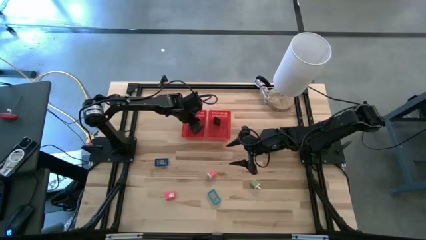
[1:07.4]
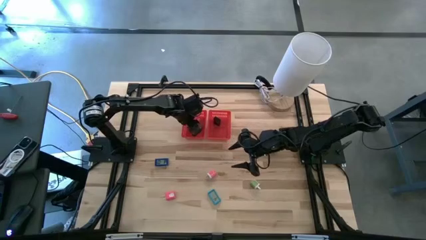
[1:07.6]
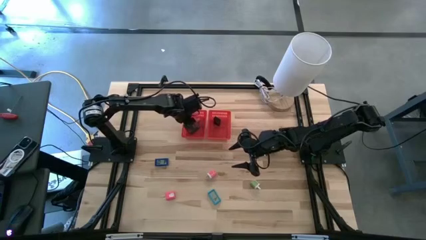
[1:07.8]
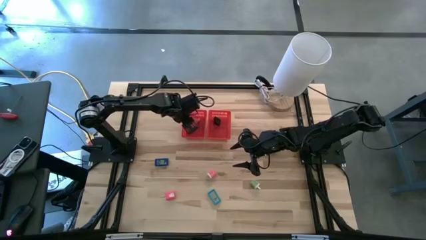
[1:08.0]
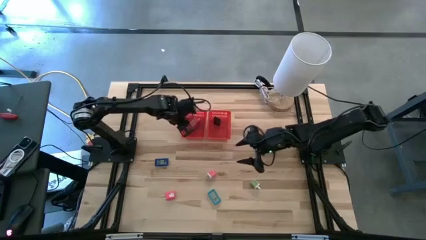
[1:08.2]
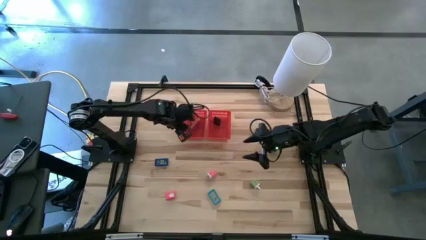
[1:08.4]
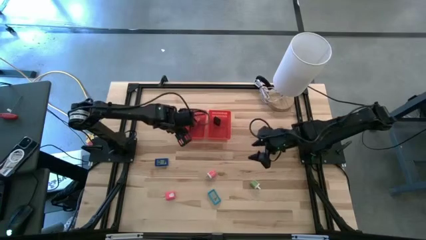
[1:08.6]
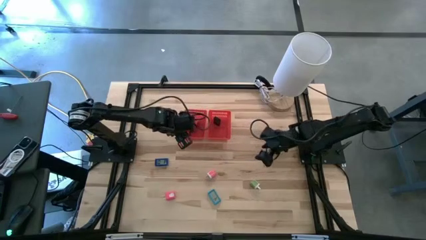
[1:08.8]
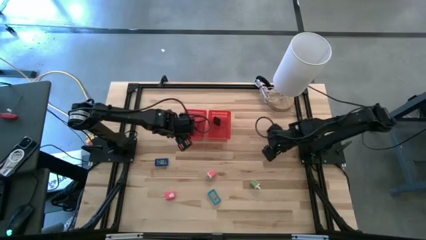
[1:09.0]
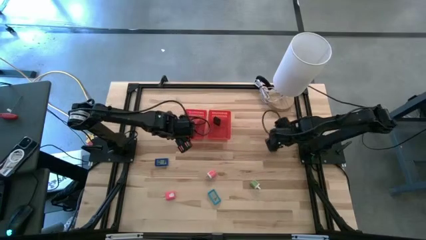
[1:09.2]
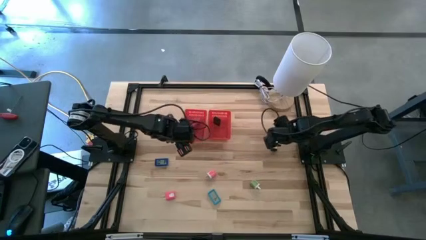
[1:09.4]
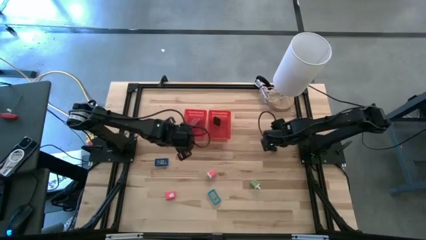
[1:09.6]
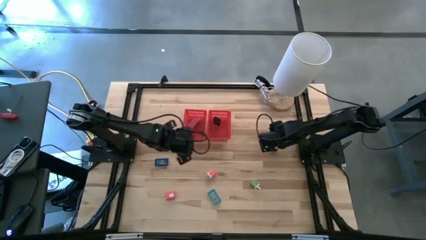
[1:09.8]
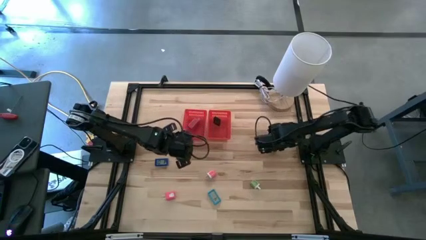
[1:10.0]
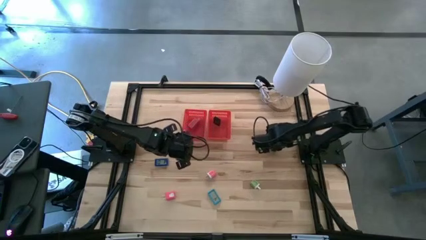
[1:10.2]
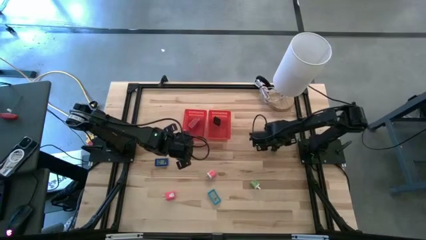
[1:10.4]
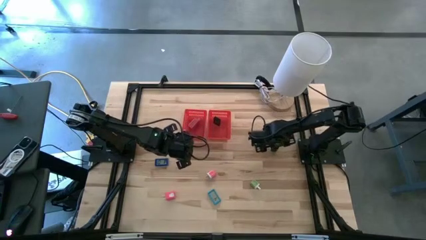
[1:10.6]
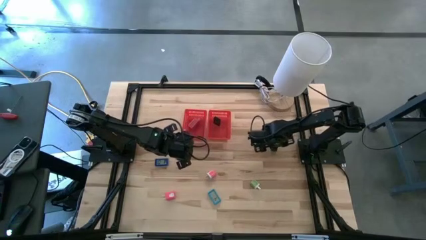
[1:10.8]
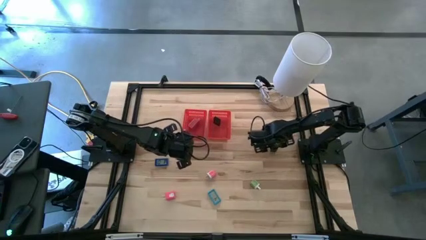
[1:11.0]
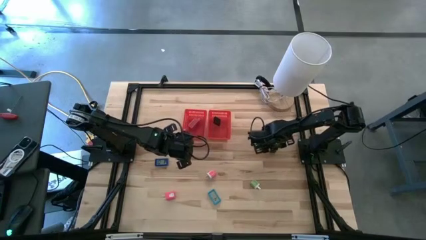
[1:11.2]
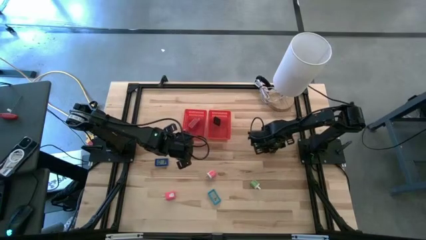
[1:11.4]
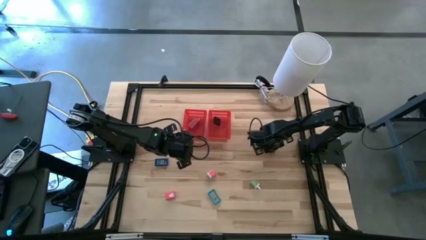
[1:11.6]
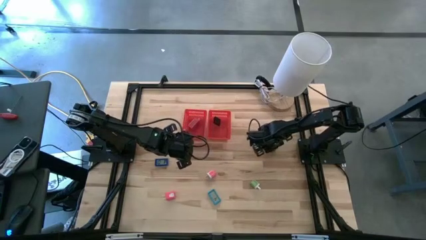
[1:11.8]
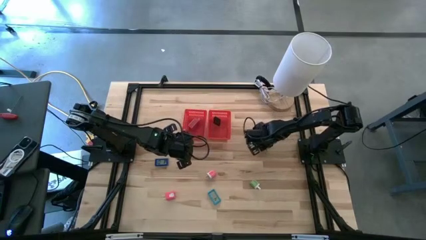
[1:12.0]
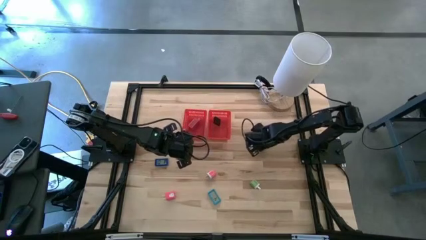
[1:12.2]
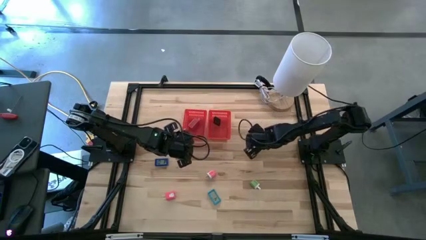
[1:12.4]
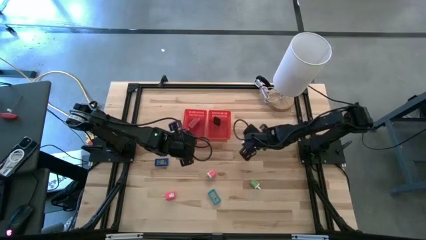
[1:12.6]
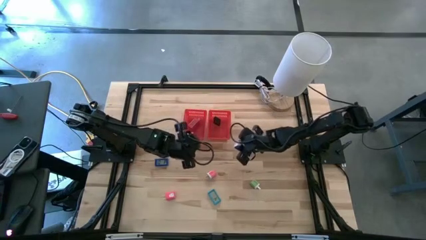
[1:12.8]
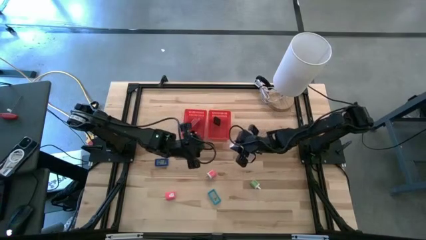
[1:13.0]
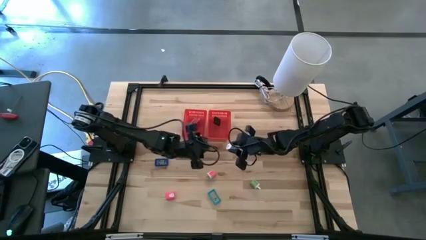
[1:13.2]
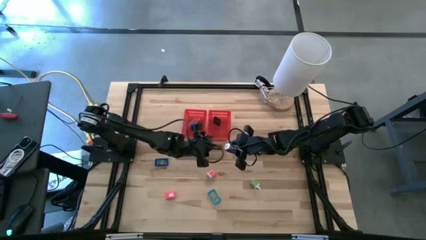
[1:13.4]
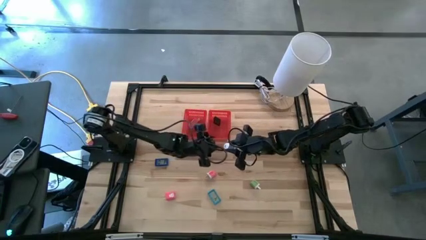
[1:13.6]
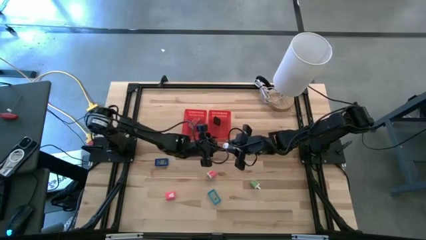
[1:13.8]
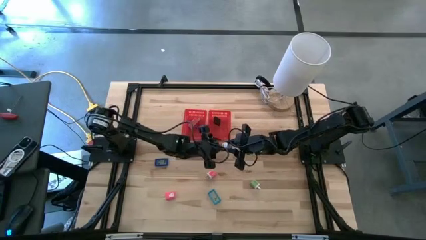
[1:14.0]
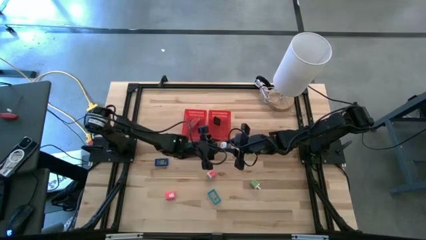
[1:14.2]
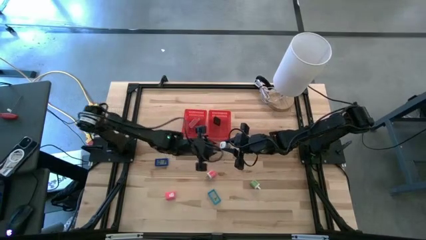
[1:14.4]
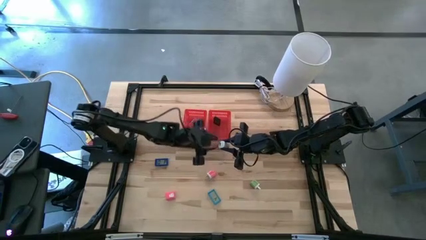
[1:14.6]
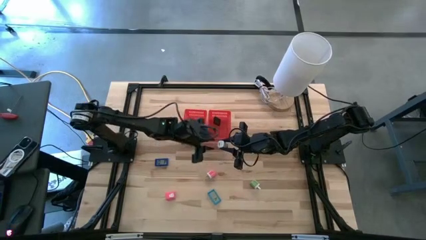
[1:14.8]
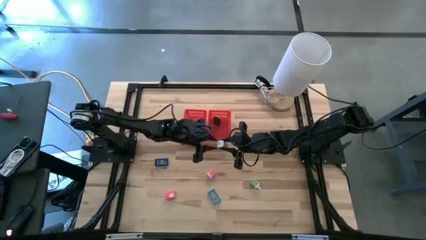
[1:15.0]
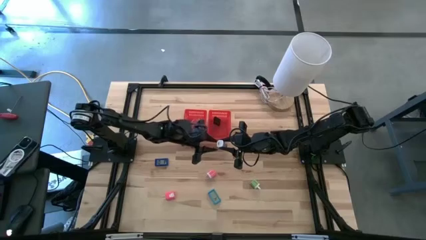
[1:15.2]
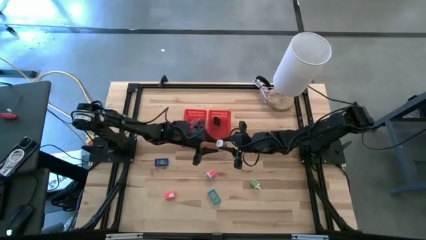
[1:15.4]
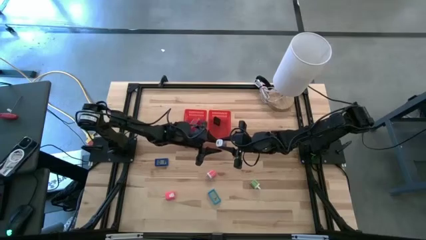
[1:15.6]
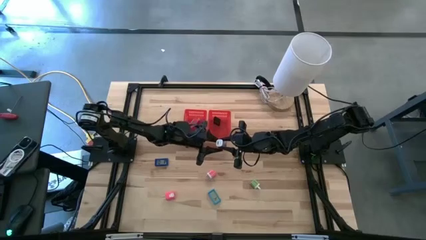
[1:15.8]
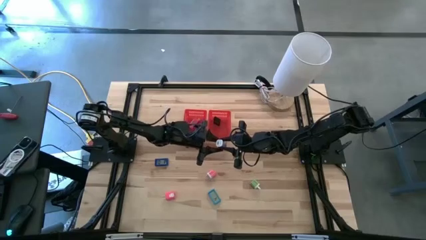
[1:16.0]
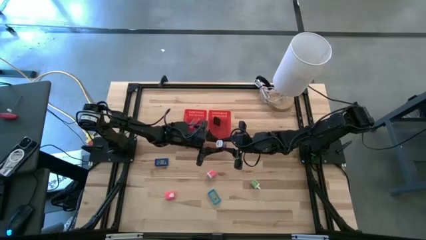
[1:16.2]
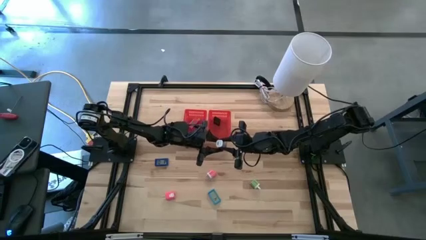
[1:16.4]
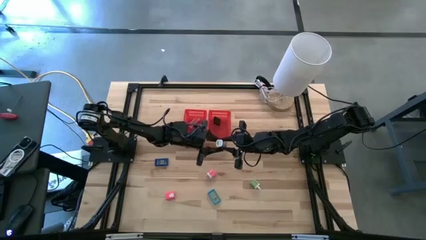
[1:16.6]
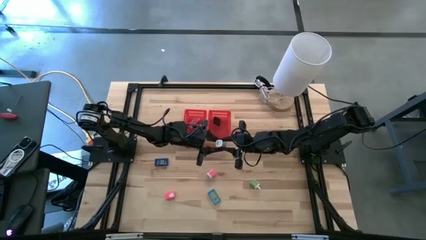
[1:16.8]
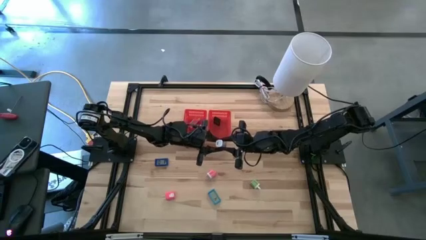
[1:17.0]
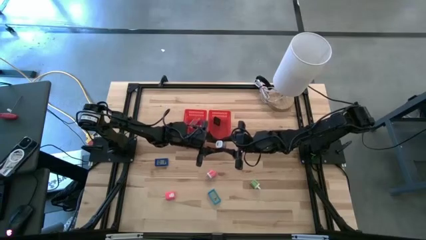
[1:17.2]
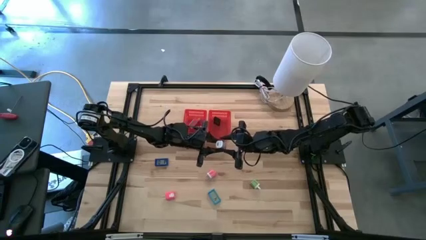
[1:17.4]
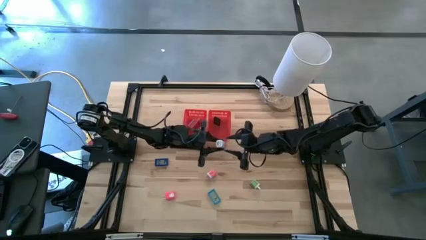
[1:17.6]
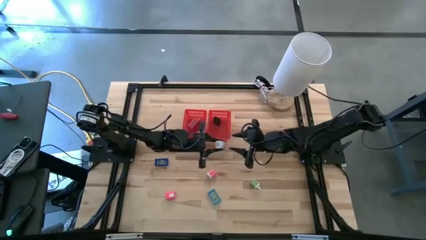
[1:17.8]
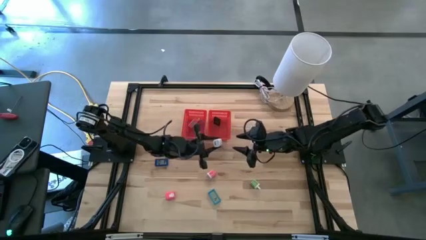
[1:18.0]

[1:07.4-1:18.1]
Task: Pick & Place Office items
Put the white charger adapter into the left red bin

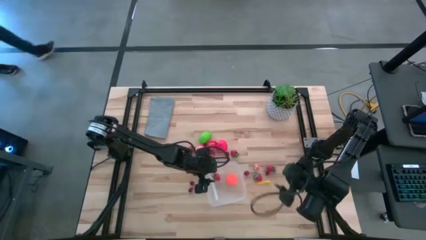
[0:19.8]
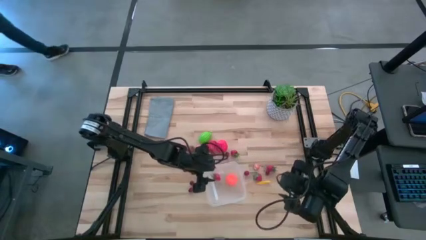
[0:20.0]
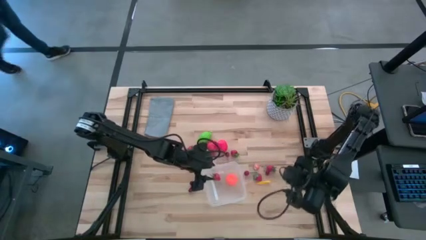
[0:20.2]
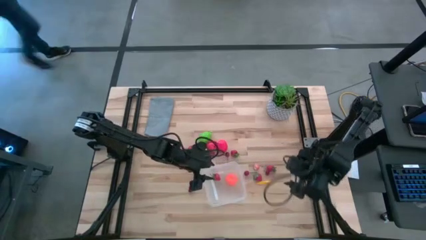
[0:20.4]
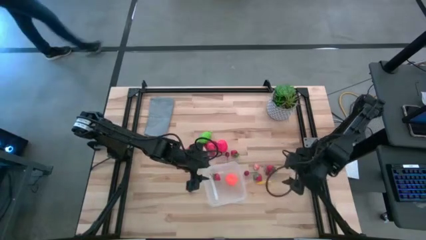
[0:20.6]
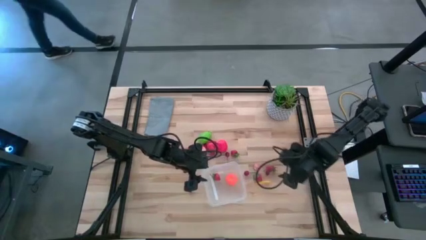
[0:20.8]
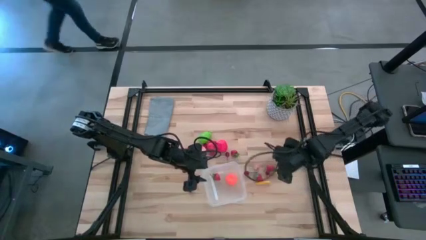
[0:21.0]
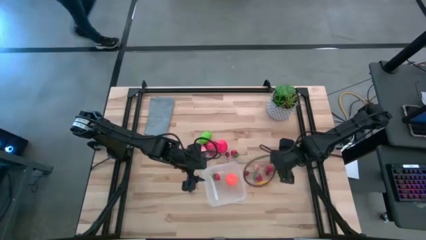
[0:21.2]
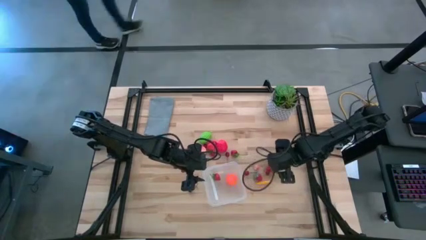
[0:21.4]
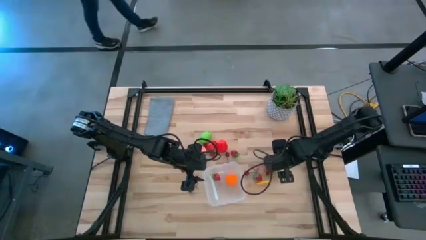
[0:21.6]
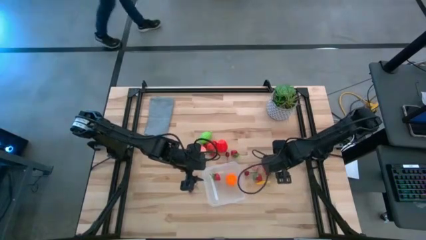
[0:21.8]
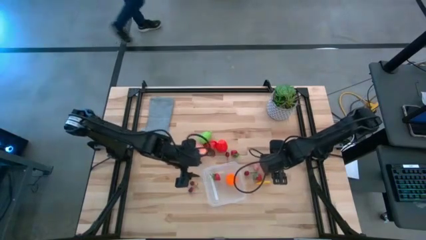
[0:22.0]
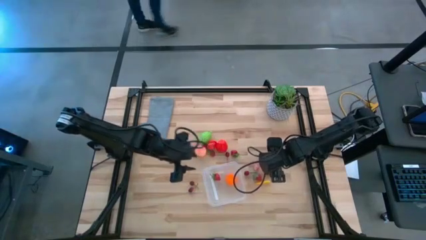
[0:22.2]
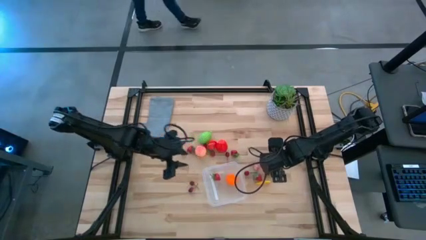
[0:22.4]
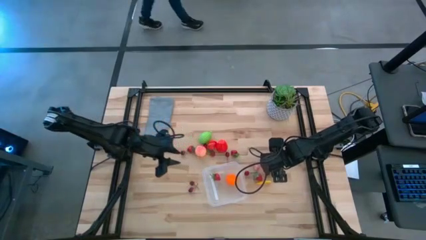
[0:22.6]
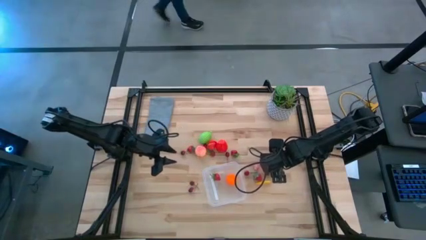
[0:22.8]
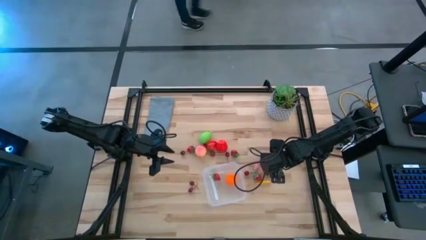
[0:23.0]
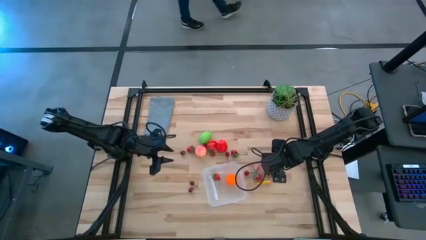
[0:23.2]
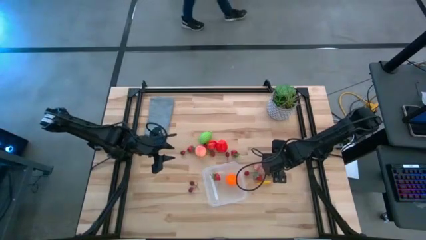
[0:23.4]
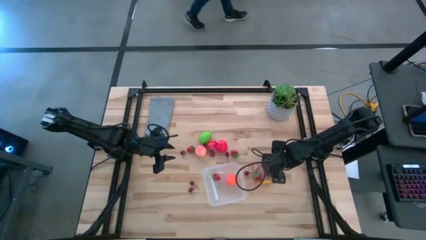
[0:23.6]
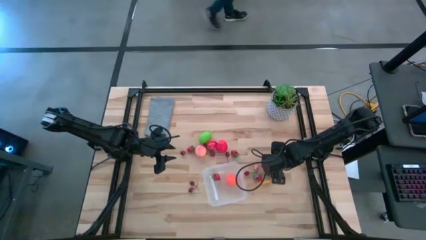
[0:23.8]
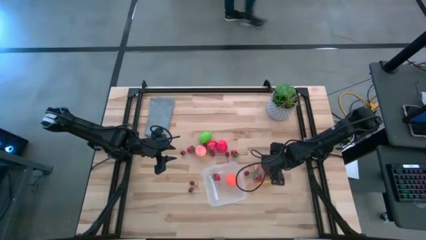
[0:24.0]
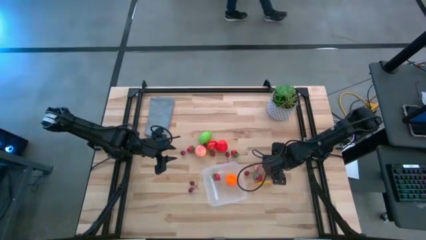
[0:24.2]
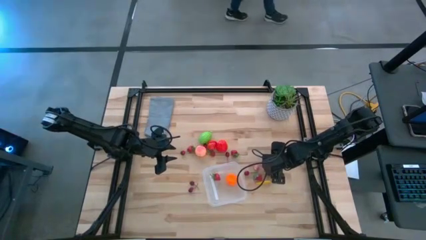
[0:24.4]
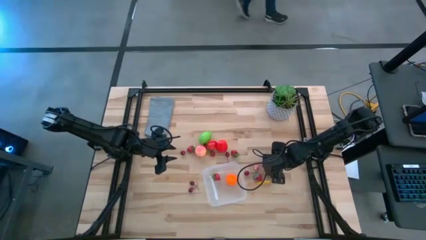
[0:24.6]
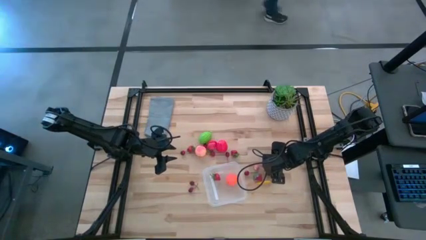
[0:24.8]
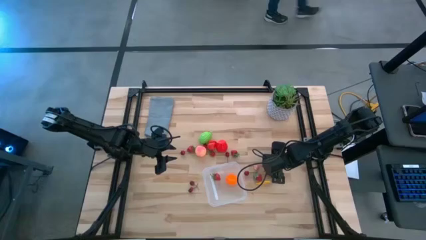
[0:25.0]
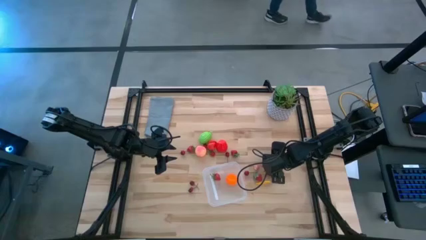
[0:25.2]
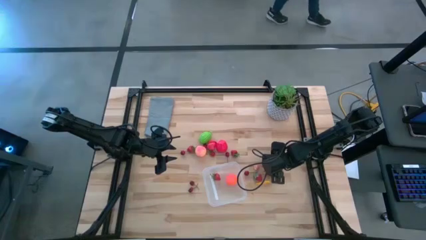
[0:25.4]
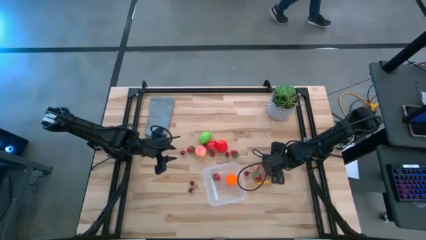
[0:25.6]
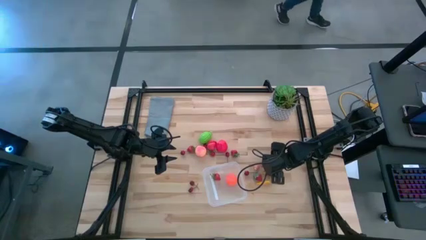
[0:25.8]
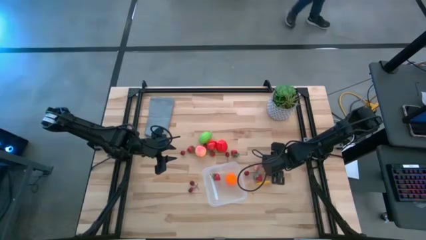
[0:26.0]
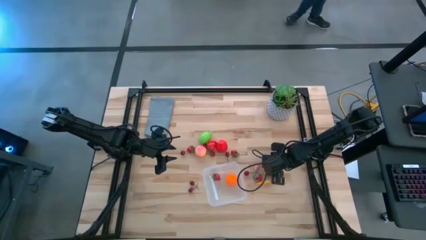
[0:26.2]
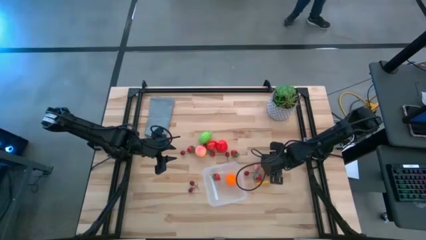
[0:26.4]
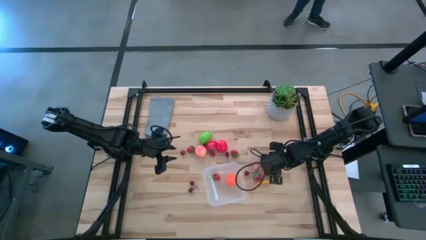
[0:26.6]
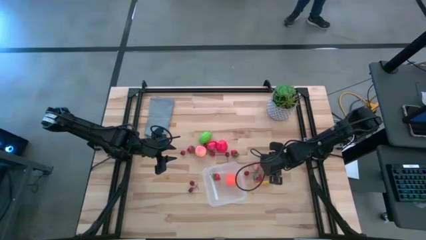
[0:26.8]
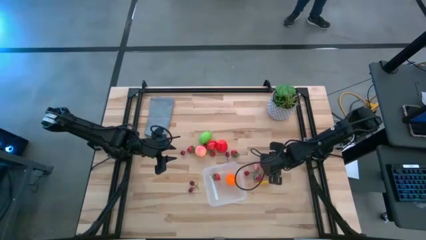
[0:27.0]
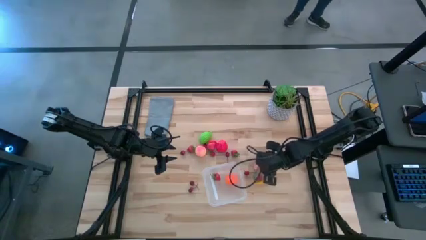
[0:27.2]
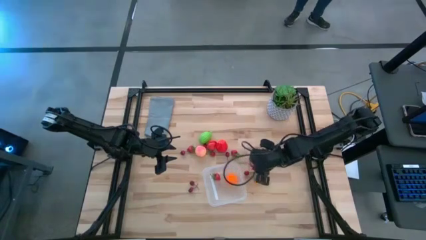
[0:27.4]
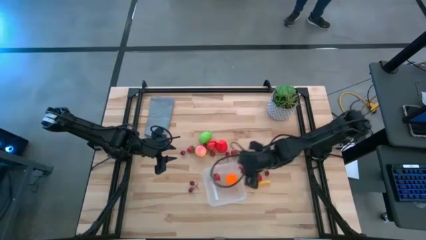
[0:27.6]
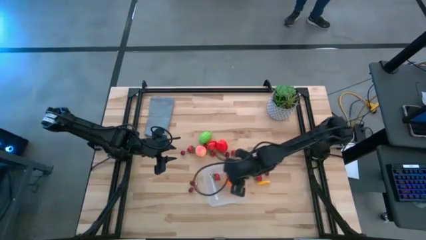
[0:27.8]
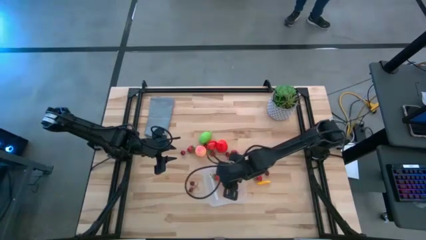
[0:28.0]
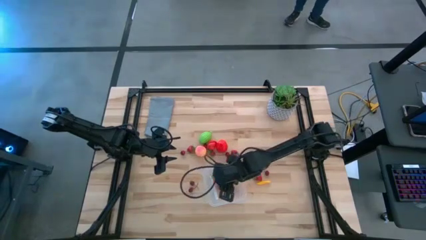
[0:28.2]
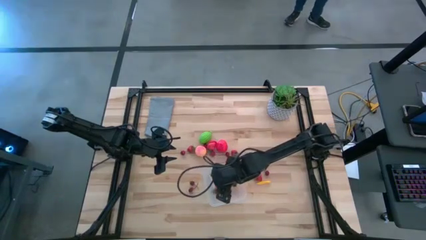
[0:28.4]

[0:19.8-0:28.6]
Task: Pick and placing Produce into tupperware
Put the red strawberry into the transparent bin
